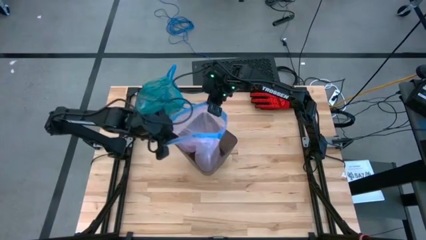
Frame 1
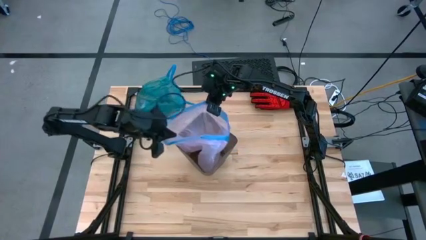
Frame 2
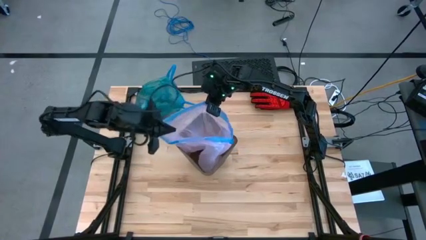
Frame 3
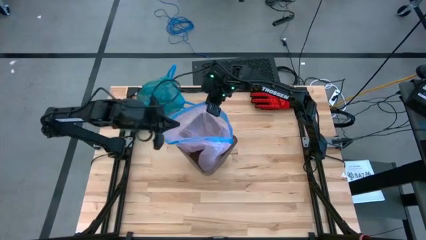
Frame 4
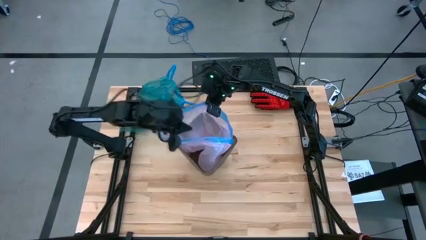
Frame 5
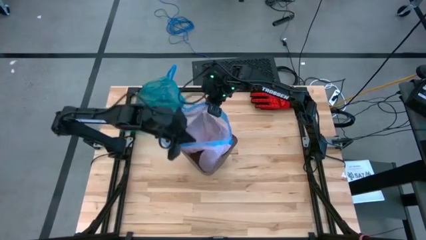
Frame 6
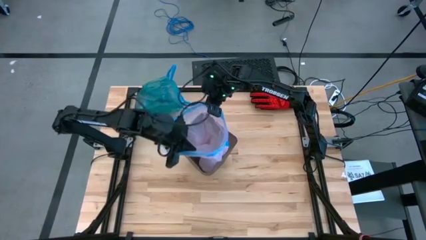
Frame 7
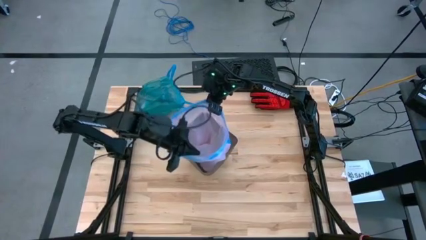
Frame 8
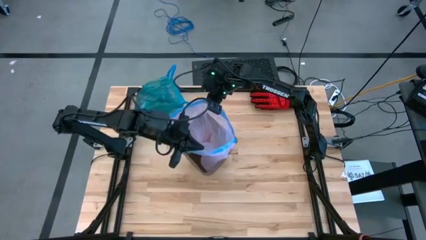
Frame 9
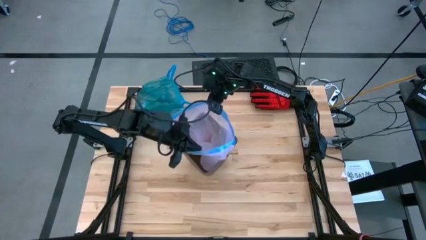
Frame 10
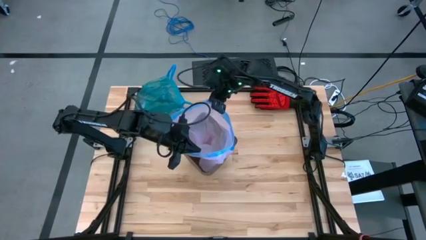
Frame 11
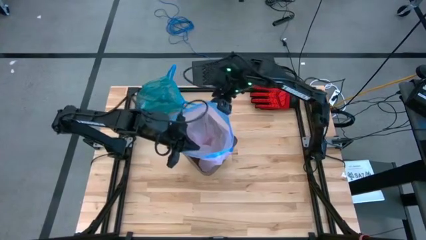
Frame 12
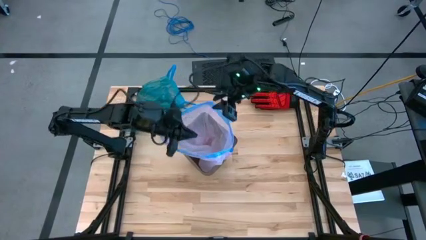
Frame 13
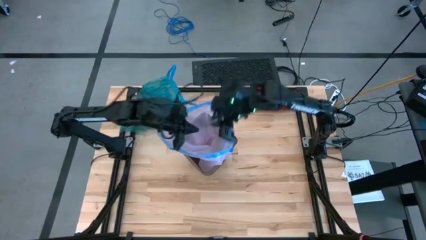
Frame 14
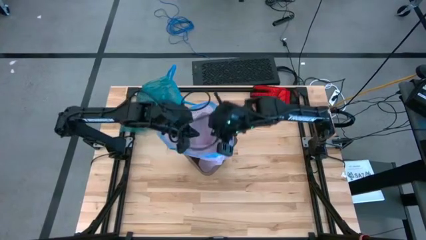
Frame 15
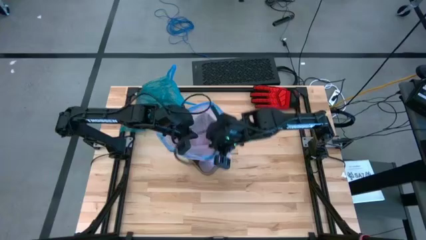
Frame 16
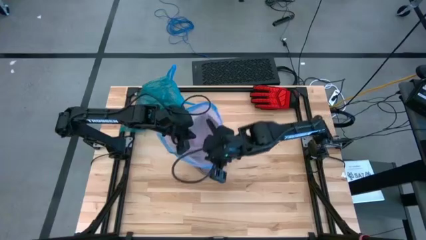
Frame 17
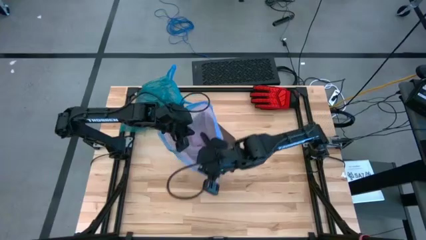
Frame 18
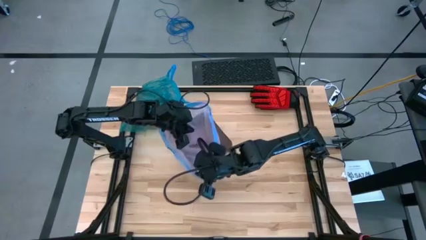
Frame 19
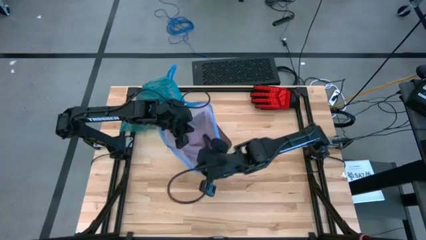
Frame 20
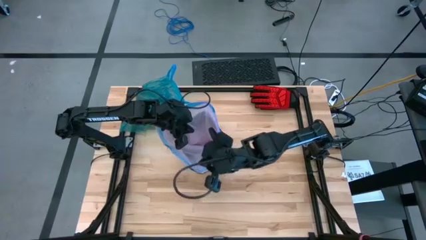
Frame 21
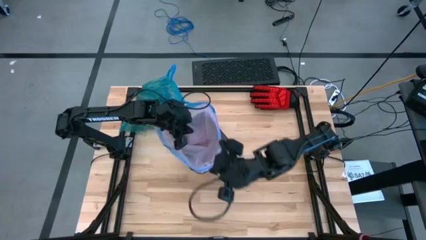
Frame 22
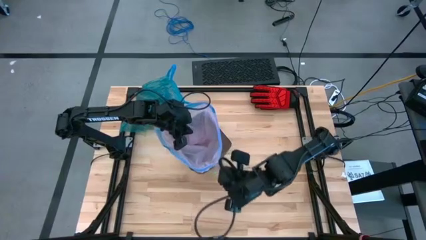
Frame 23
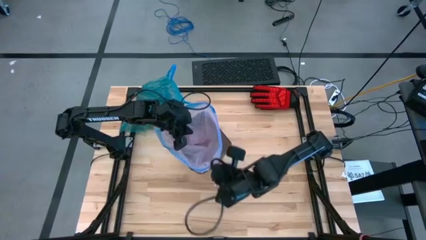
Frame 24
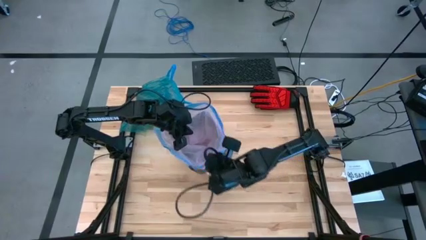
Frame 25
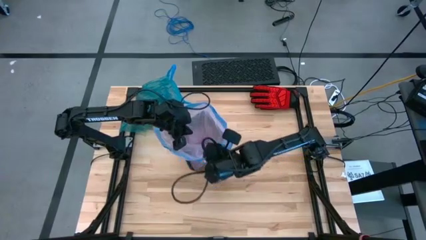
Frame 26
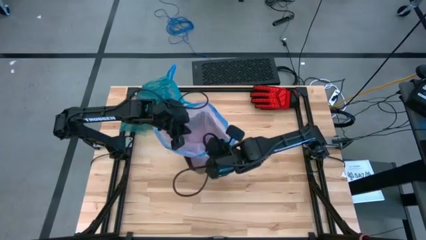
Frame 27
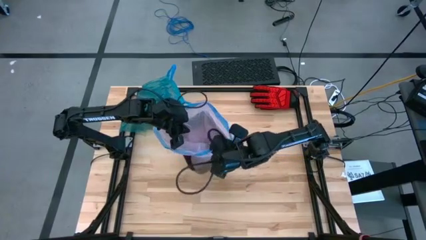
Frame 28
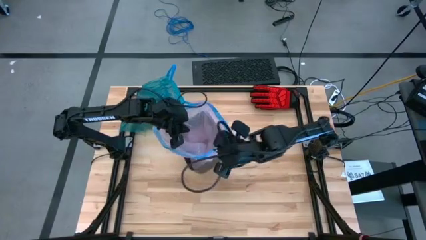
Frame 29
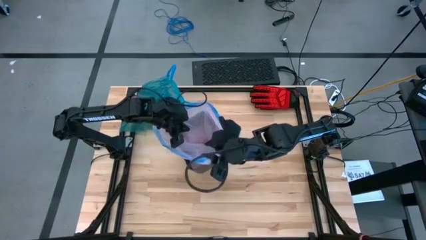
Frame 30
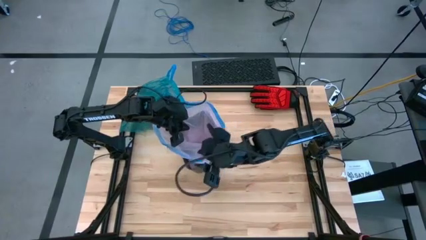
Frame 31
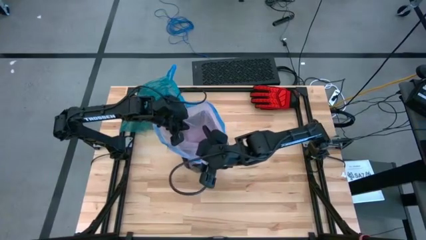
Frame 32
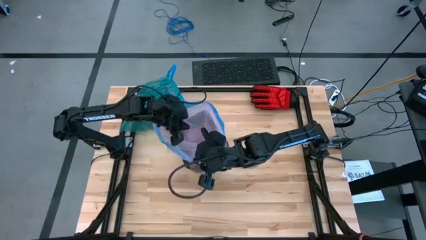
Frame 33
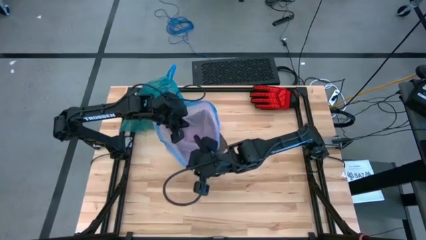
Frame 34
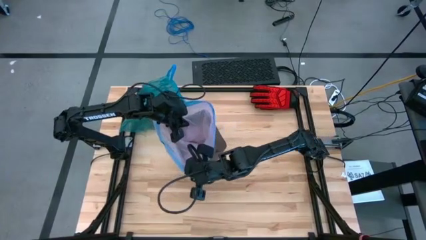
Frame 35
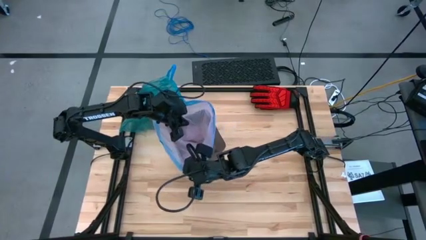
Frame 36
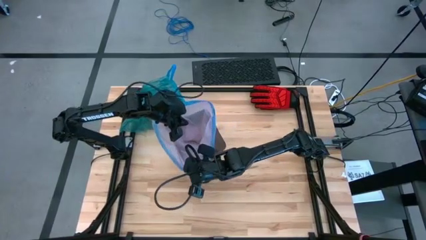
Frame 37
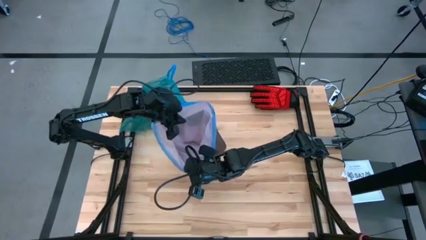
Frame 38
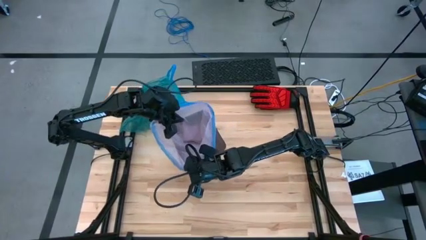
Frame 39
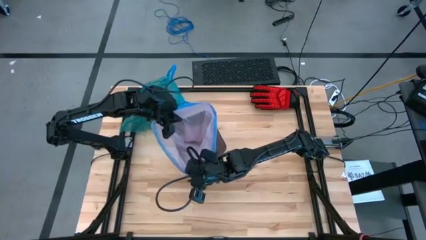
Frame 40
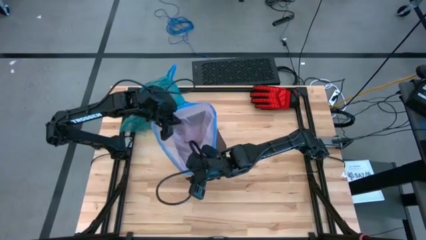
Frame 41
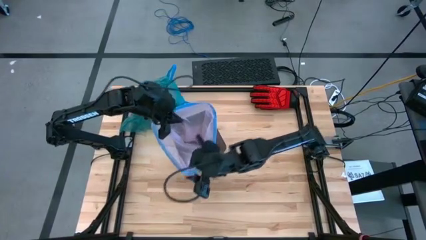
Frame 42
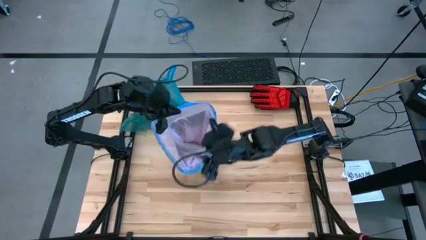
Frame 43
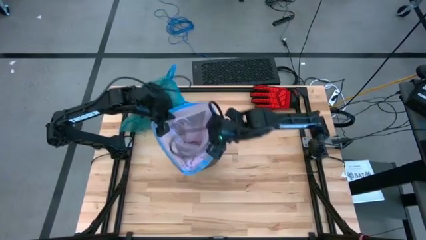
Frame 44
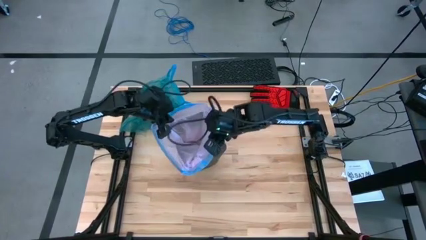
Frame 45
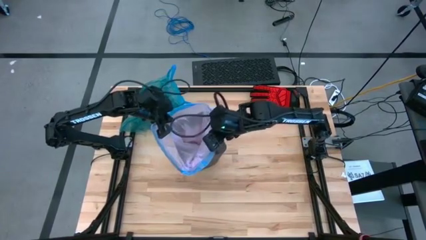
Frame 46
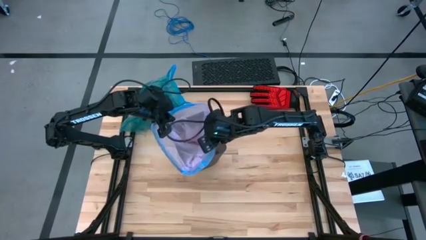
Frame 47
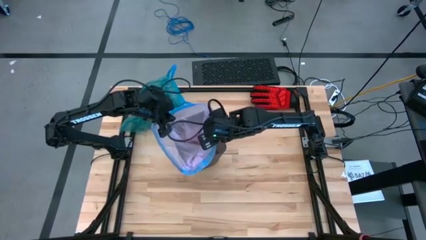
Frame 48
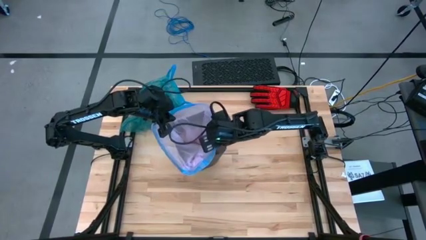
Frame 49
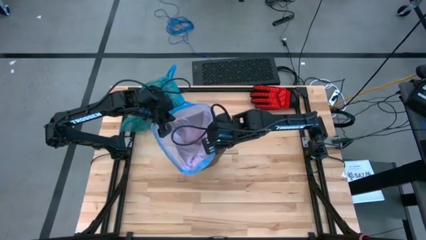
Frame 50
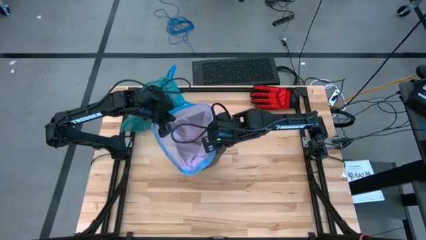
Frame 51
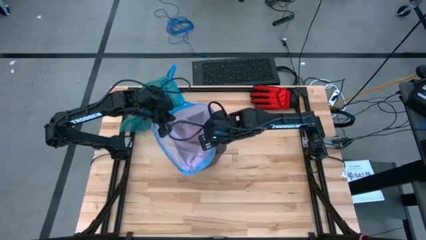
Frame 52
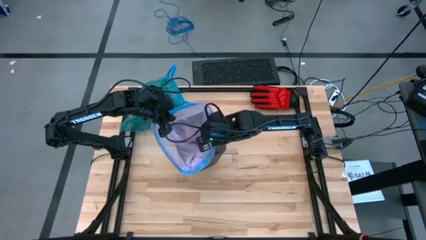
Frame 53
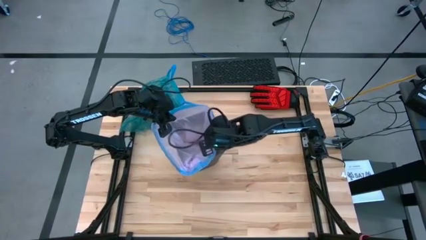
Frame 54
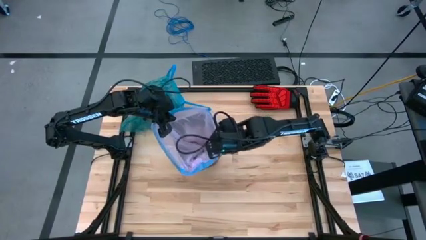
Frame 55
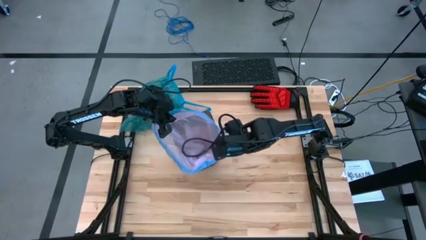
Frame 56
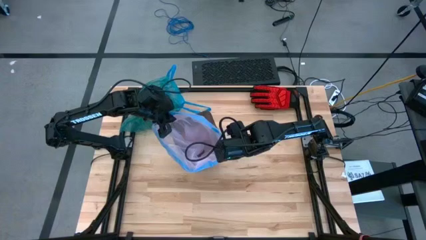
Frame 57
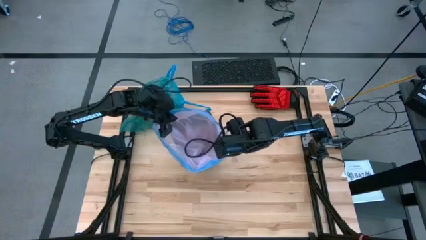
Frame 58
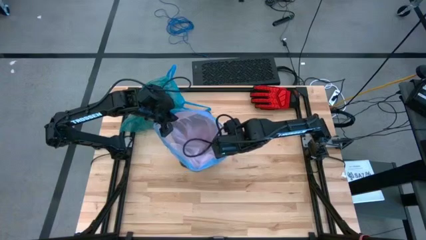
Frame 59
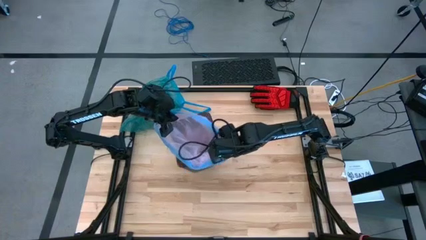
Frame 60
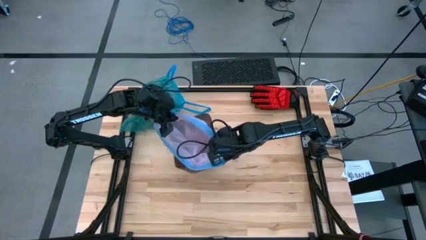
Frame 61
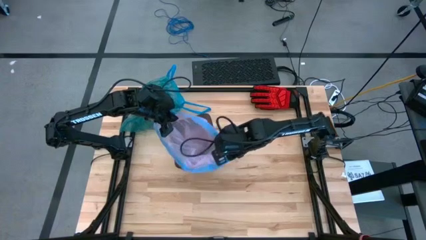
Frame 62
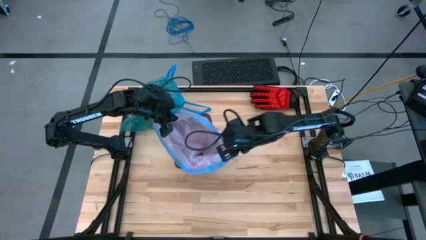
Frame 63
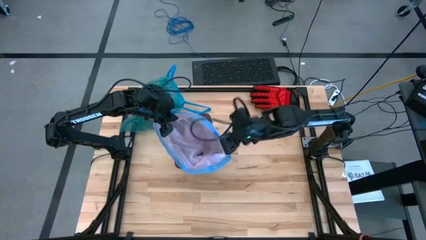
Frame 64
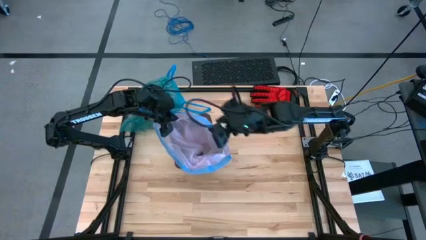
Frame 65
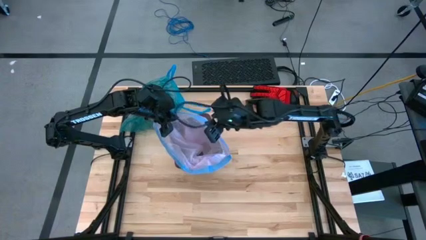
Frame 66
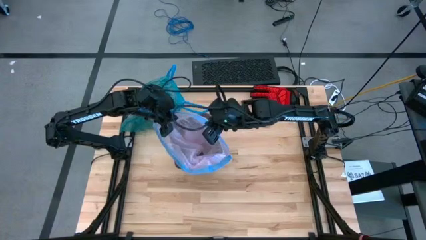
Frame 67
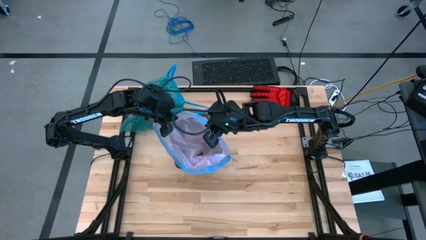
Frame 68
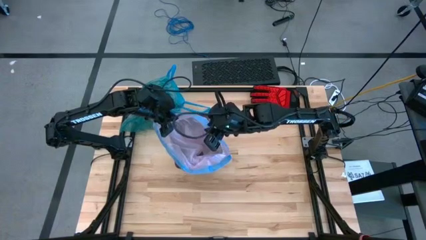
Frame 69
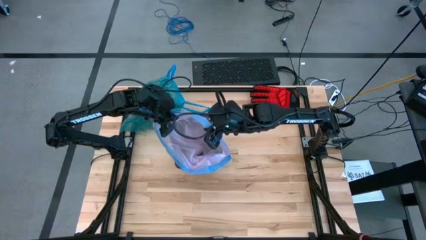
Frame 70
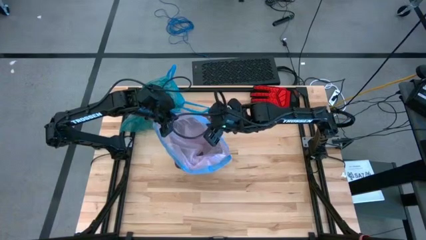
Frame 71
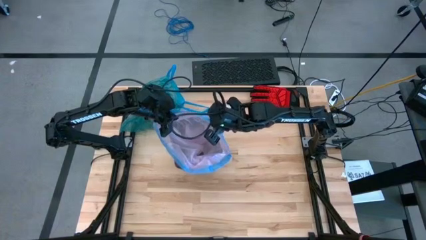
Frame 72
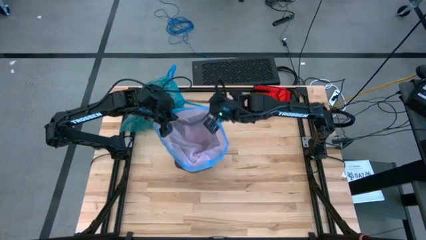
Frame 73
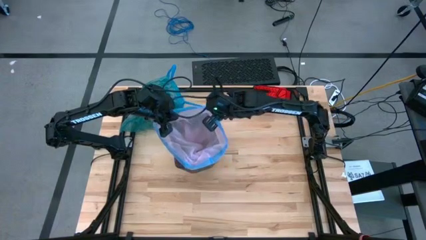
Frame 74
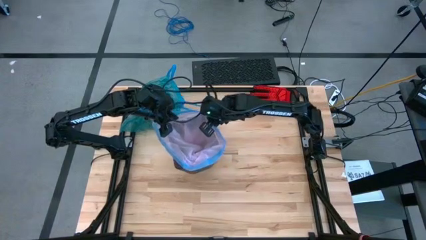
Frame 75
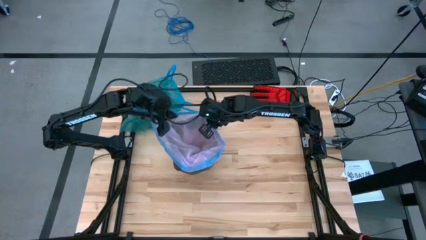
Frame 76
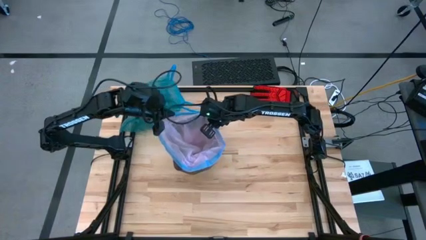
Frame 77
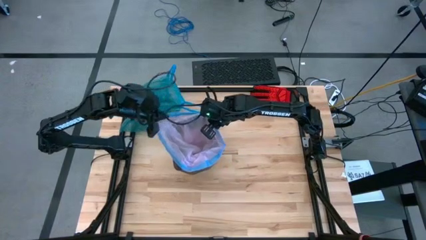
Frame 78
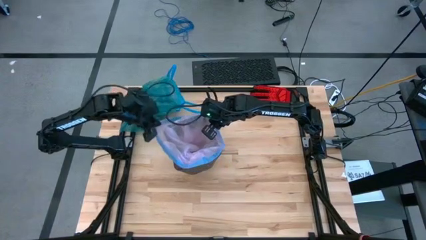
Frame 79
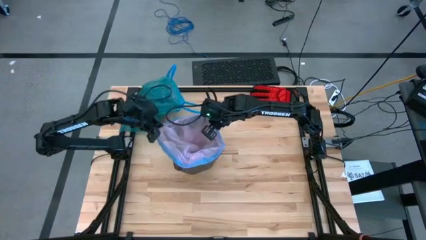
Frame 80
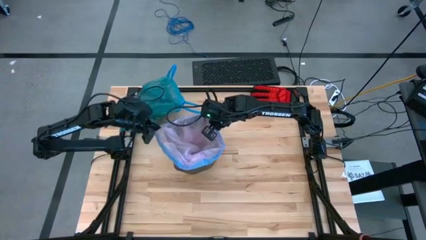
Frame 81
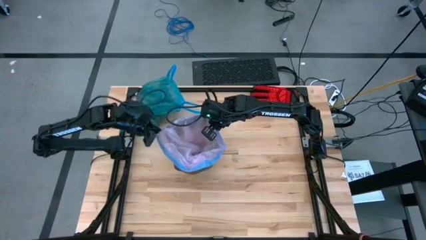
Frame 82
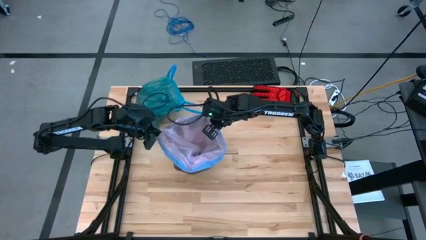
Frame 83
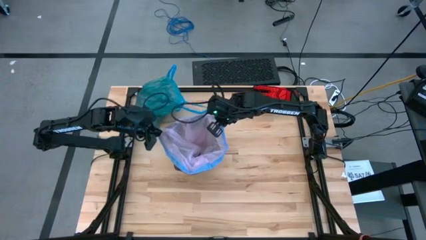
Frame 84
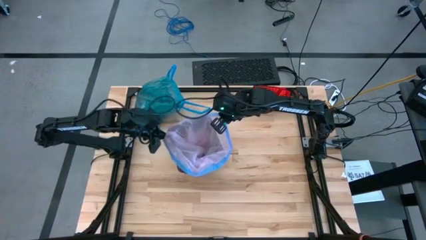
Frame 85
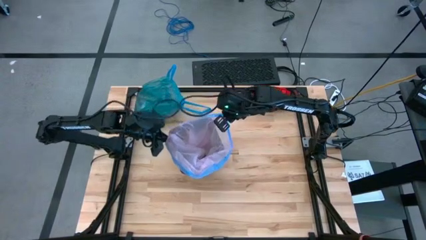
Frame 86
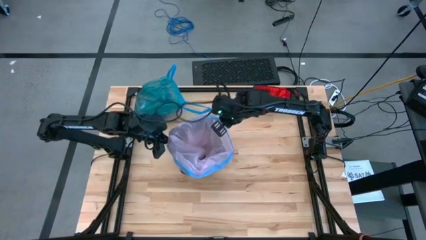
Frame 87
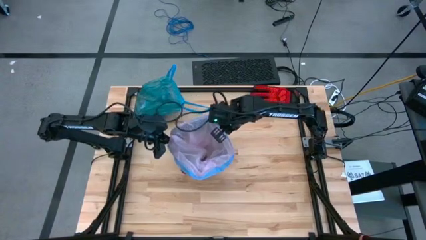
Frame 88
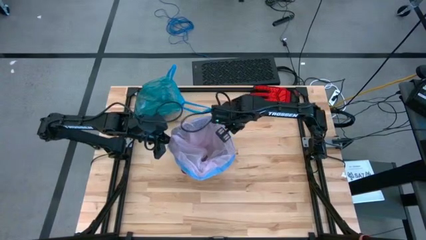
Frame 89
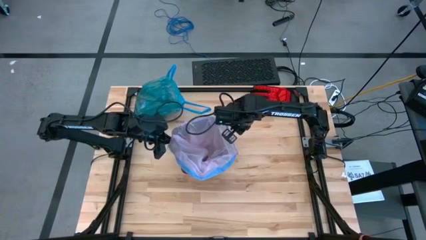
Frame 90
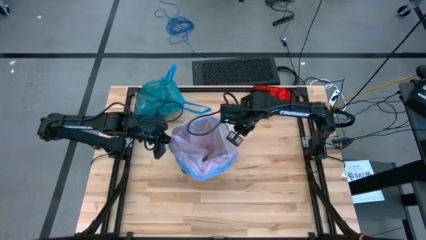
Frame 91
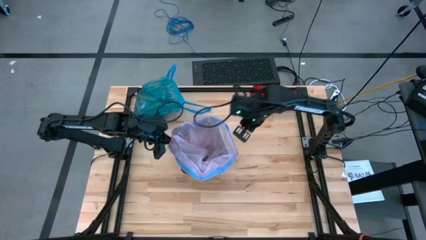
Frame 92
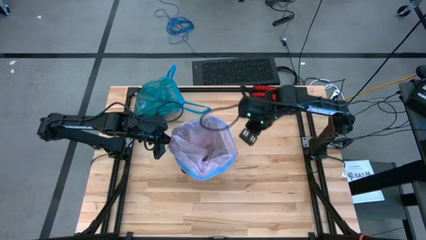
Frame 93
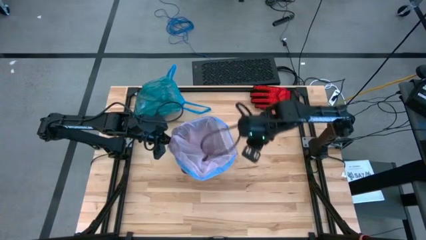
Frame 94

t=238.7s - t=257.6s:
Task: place trash/remove bag and relplace
Insert a new pink trash bag into the black trash bin
